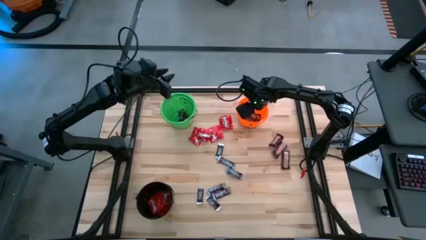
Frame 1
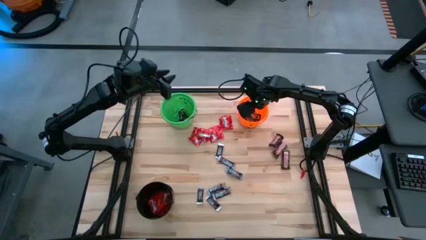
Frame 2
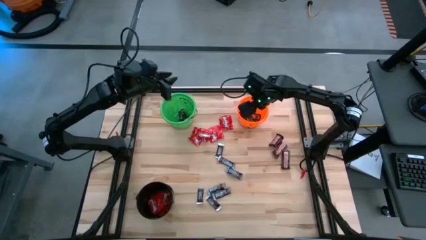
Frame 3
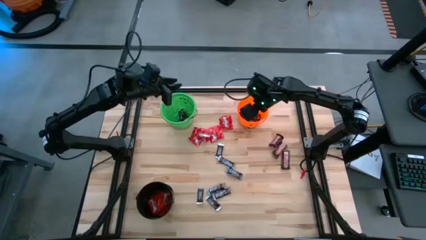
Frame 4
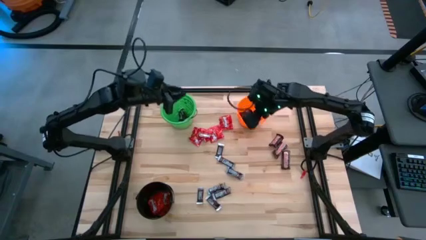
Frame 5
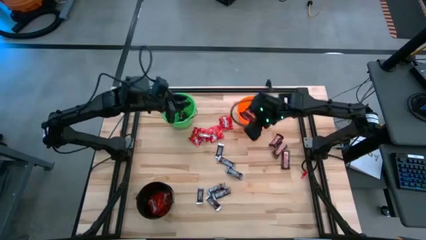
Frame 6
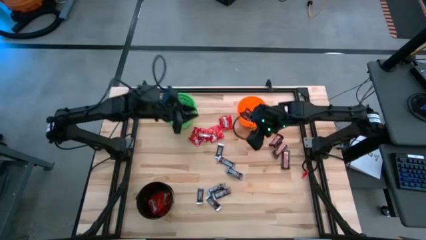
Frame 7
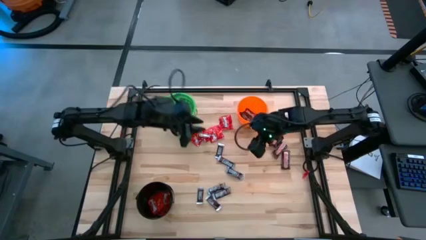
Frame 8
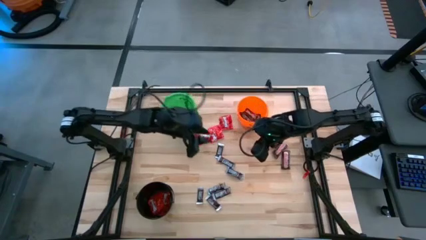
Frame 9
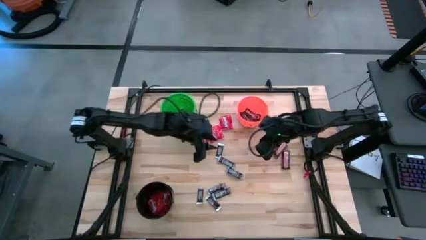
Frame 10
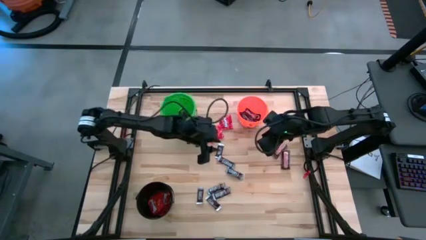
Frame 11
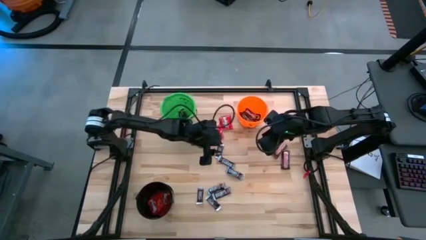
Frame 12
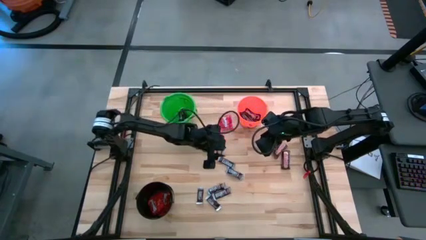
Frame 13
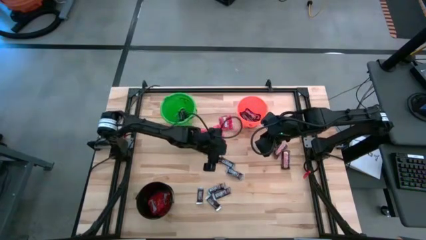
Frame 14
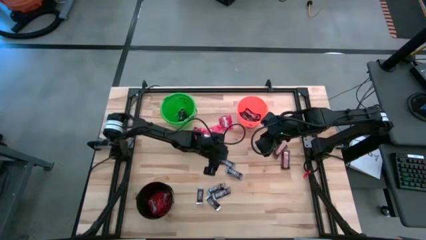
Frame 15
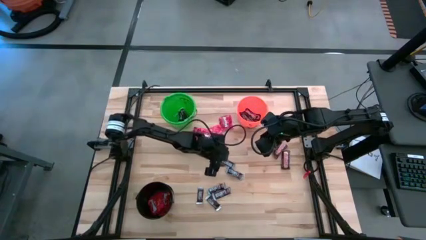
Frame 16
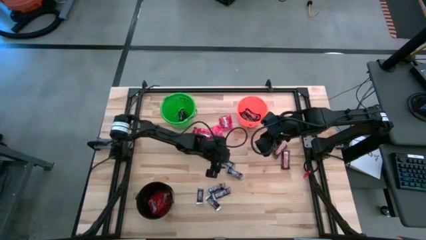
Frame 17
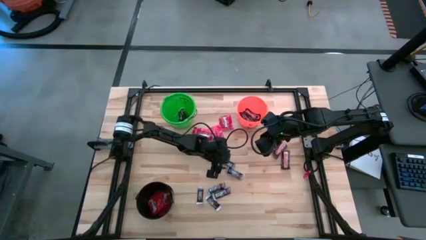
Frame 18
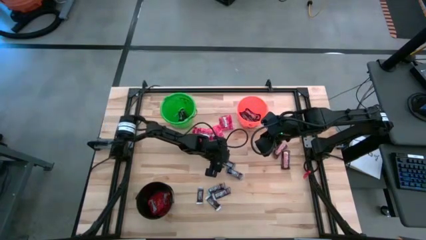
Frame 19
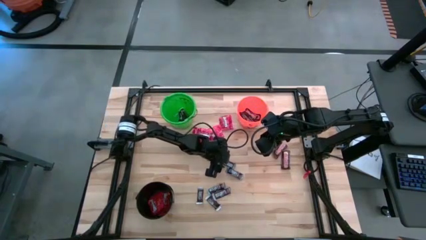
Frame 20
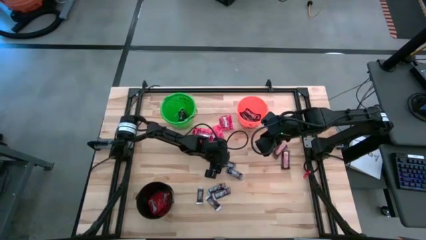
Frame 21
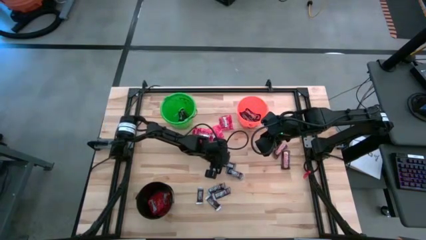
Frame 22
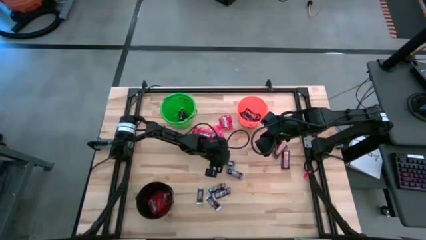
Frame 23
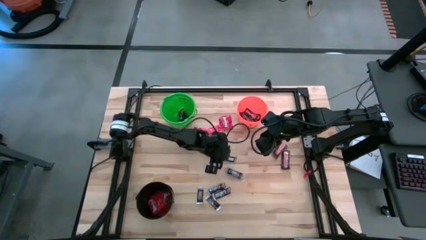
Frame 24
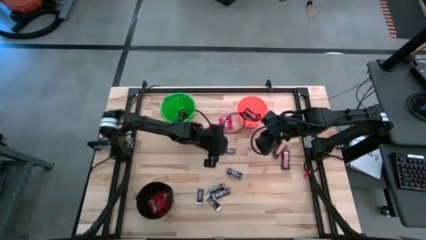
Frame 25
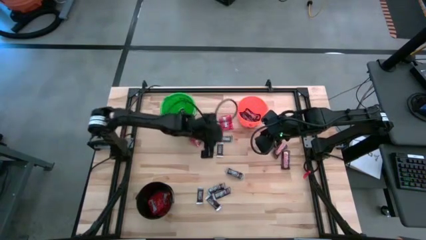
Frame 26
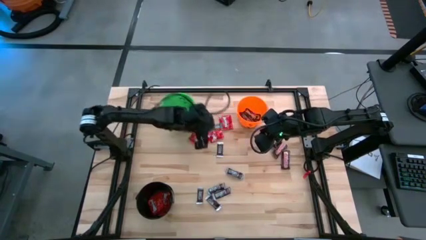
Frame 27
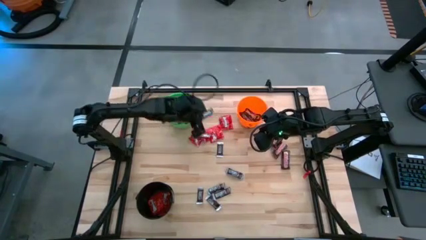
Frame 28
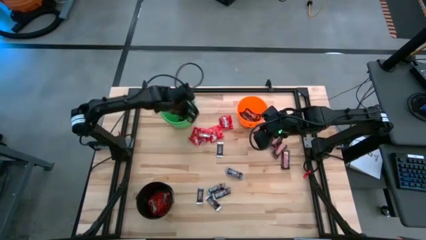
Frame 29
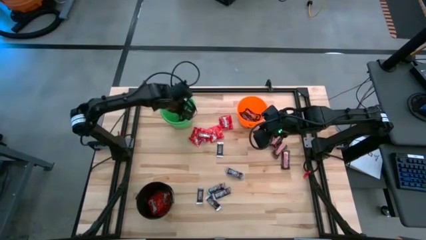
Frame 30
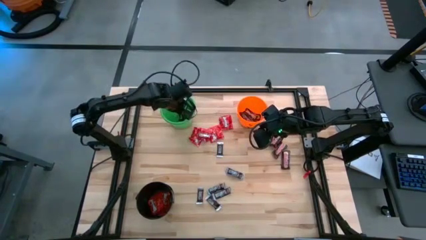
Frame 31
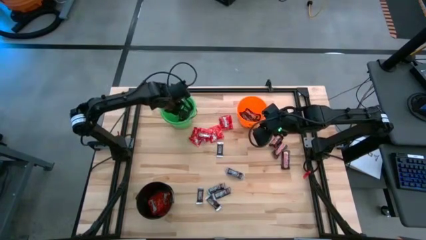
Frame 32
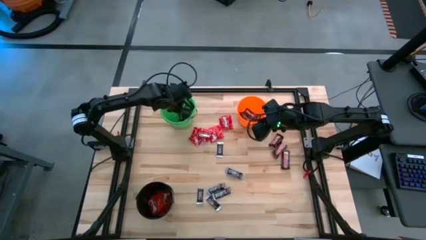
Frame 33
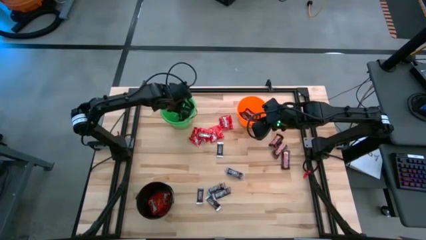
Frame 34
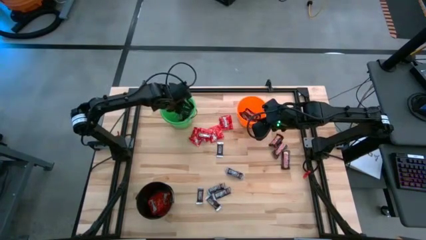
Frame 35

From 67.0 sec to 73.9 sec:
Task: Sort candy
Put the black chocolate into the green bucket

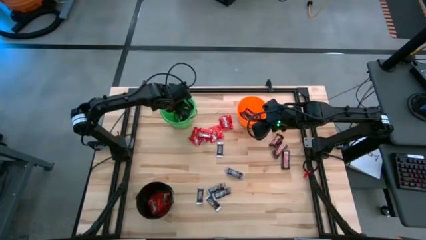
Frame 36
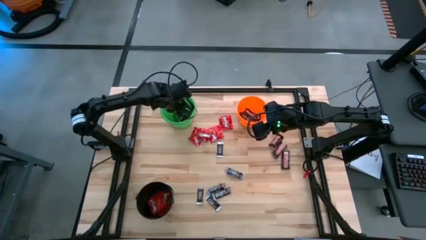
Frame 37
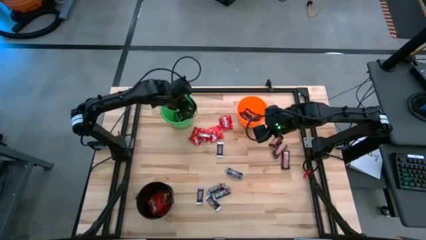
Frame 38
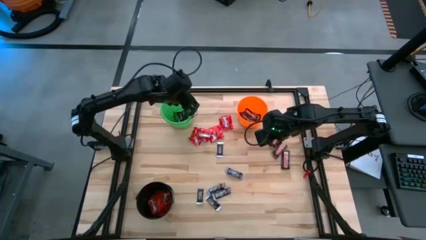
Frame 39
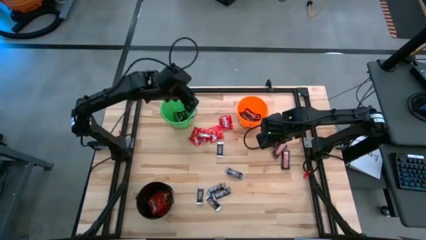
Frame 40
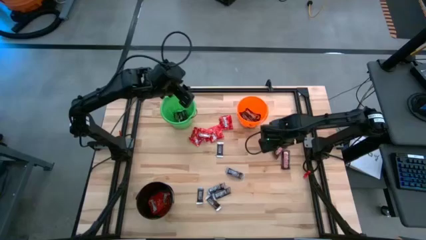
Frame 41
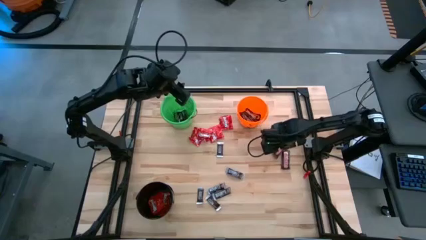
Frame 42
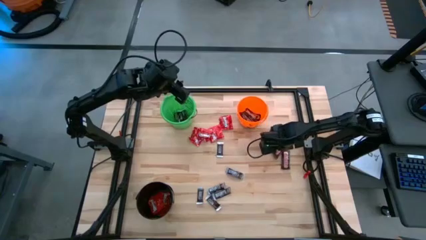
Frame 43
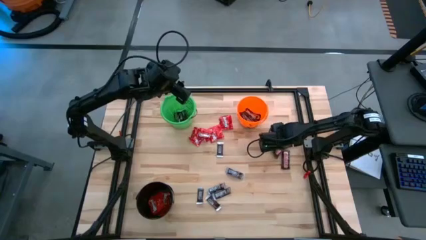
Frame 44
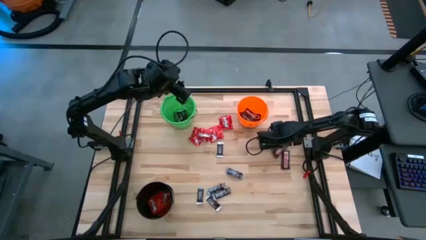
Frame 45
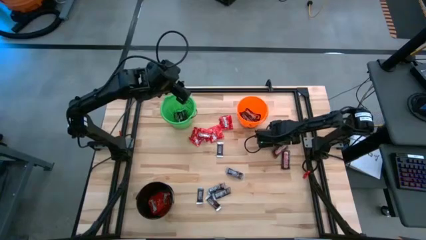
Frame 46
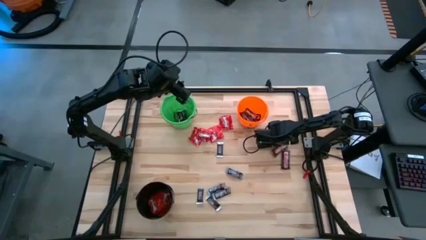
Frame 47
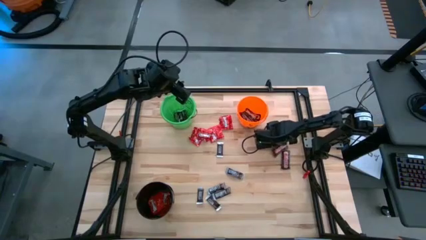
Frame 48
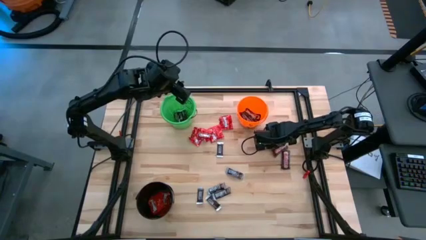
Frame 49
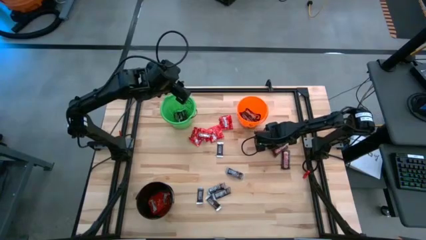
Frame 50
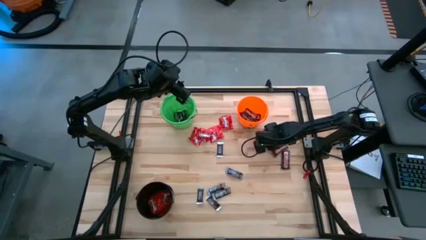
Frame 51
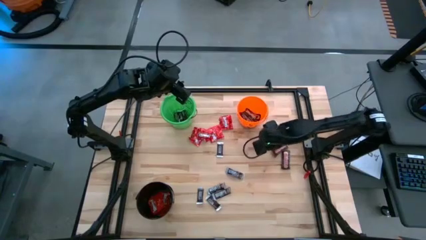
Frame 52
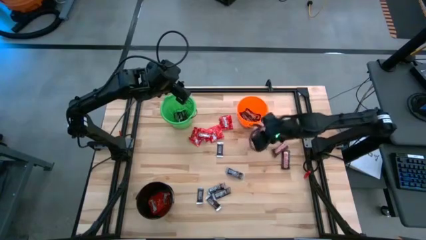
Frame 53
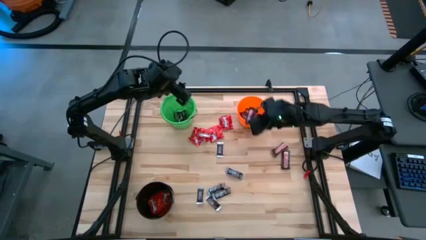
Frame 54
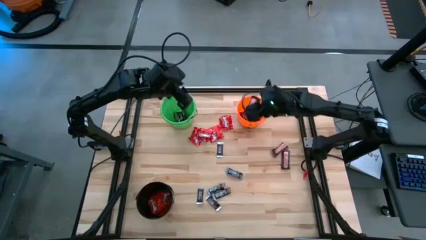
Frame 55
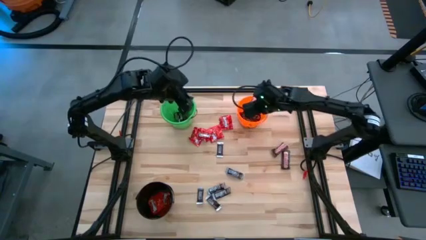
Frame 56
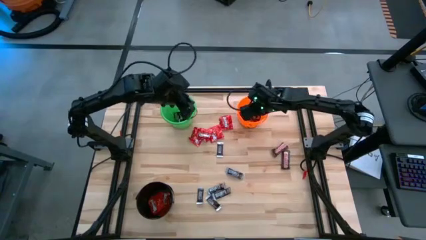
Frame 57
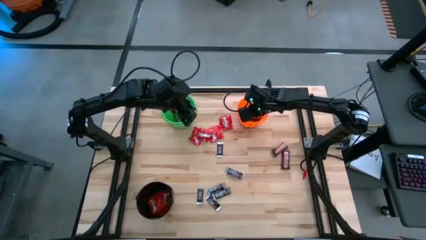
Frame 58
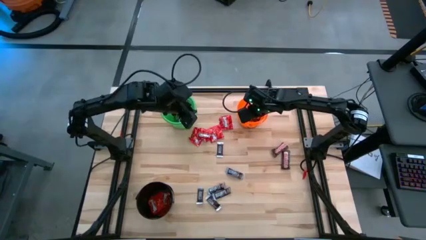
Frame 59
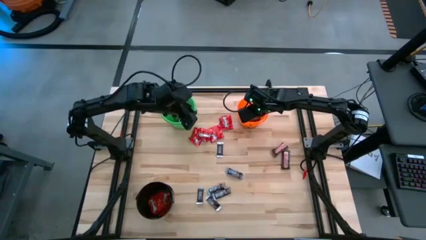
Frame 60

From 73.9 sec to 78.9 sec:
Put the brown chocolate into the orange bucket

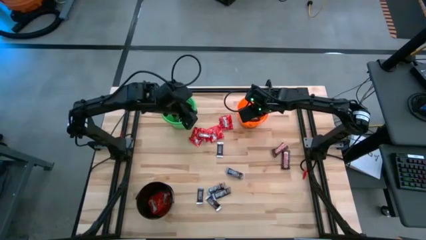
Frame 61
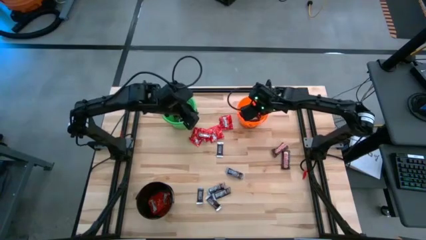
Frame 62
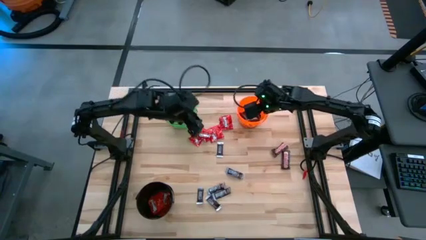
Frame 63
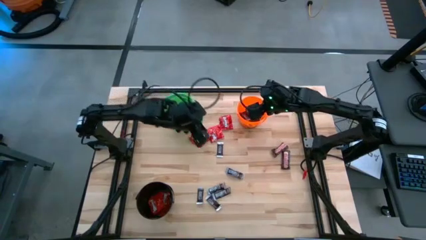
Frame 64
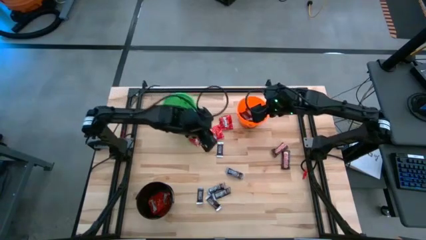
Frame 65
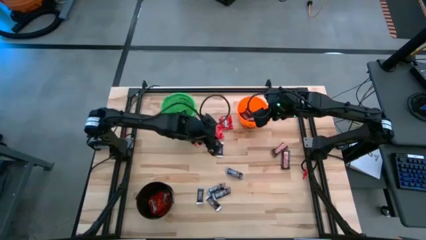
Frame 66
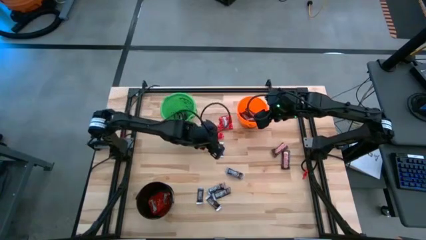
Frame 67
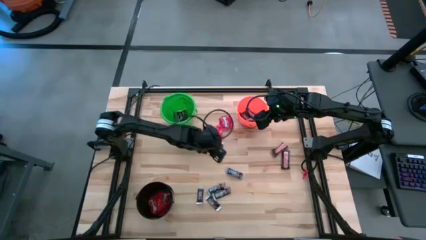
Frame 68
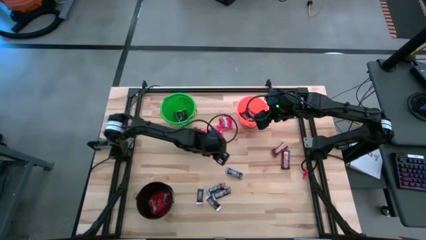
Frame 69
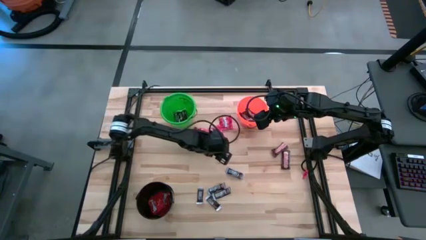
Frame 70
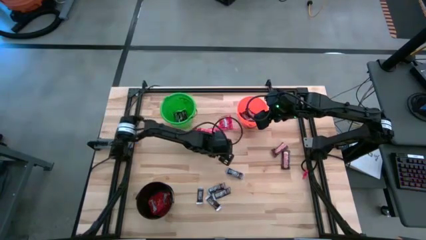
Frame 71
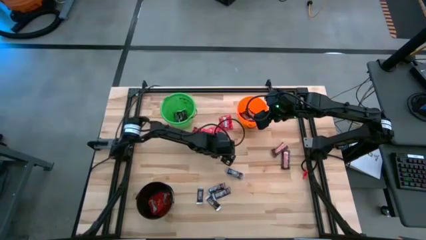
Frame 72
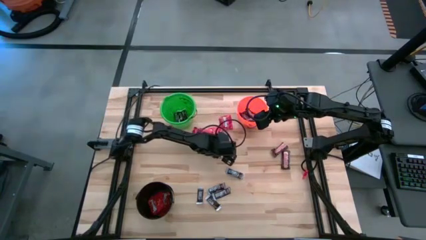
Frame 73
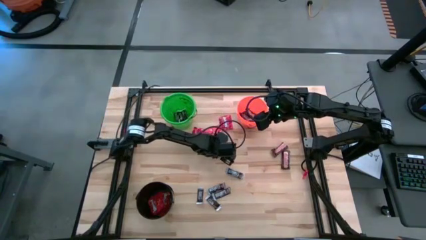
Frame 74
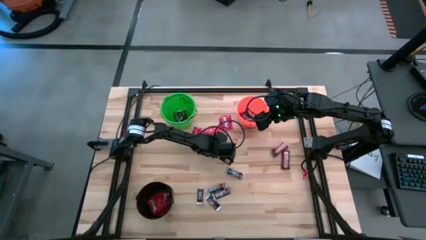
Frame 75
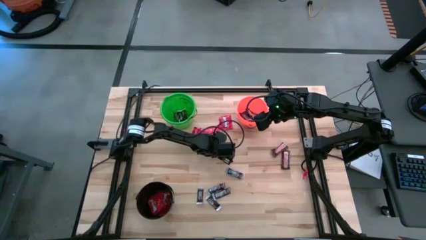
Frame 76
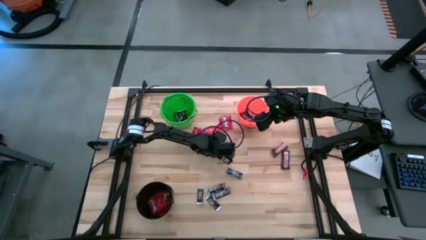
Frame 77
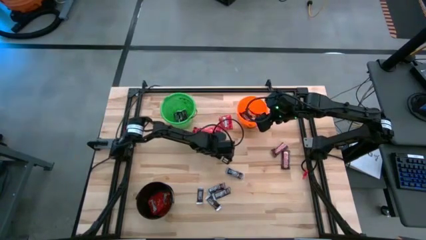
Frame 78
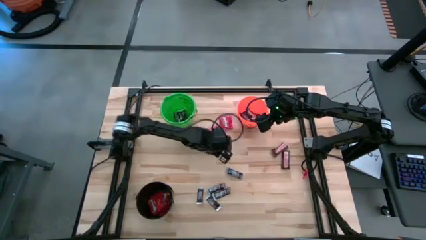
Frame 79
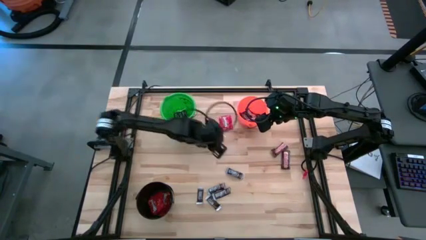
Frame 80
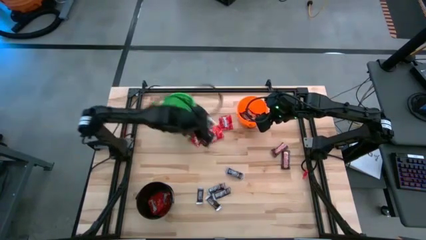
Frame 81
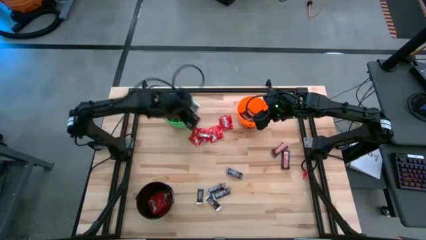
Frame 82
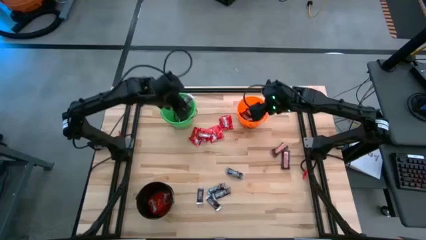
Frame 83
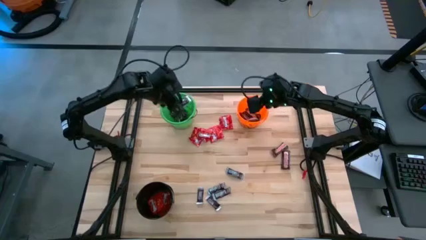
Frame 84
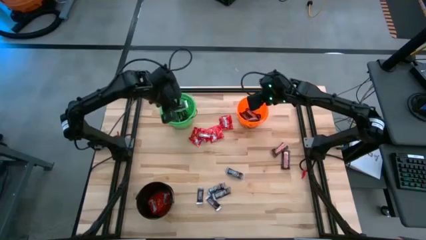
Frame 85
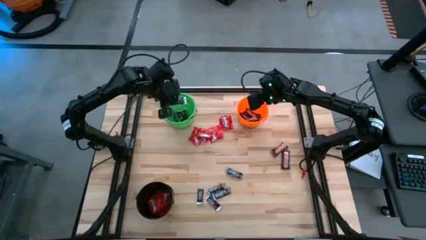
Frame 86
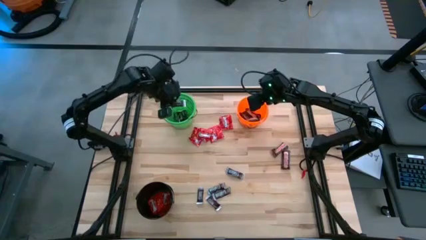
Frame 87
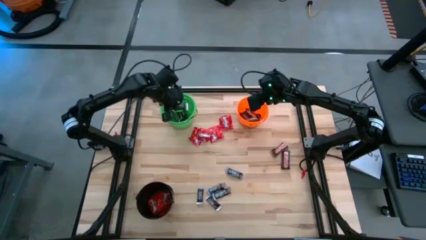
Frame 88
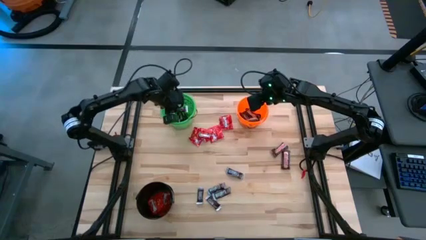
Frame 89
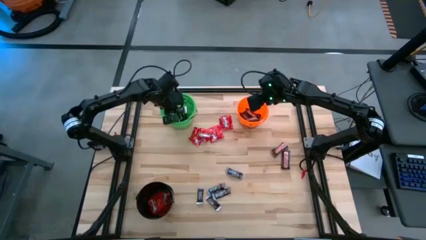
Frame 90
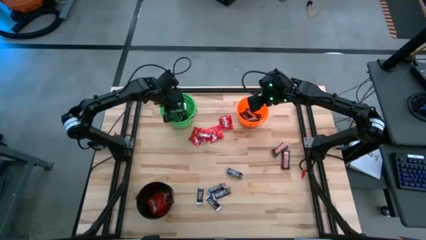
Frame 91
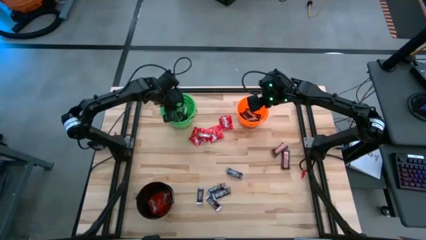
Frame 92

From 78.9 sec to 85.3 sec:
Put the black chocolate into the green bucket
